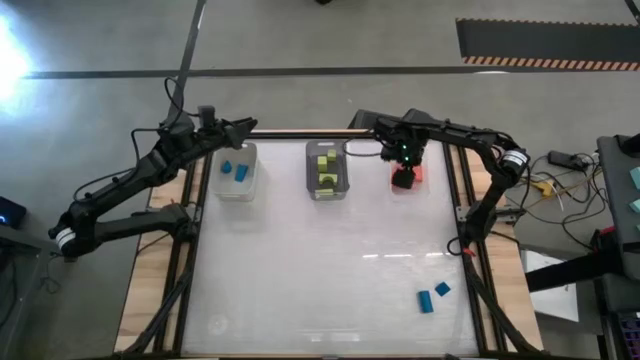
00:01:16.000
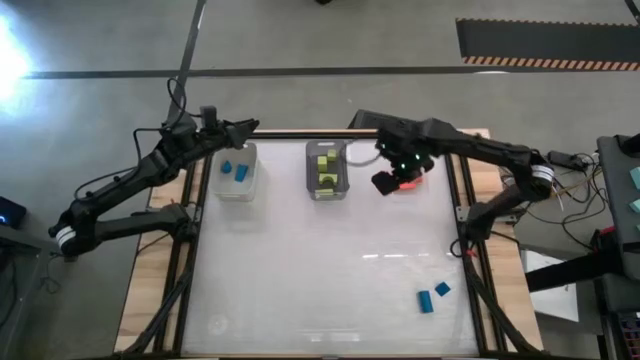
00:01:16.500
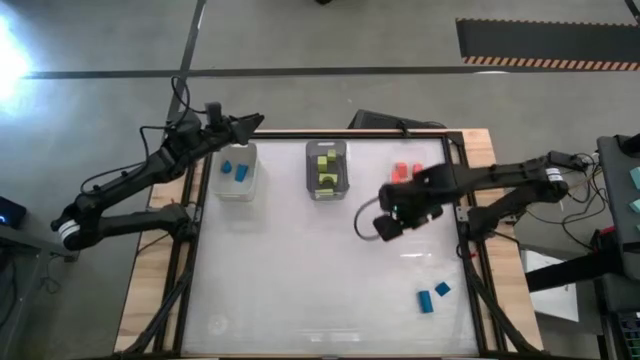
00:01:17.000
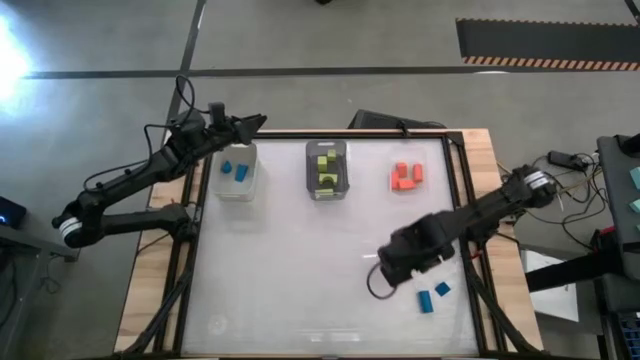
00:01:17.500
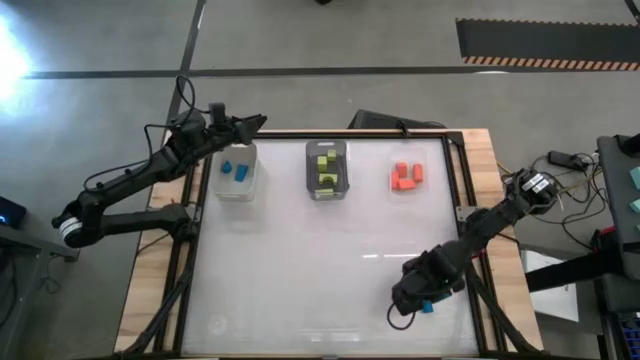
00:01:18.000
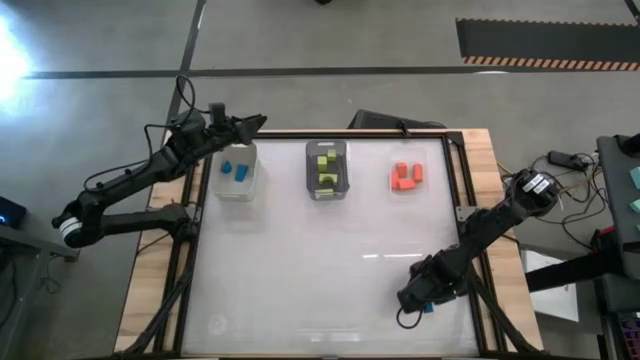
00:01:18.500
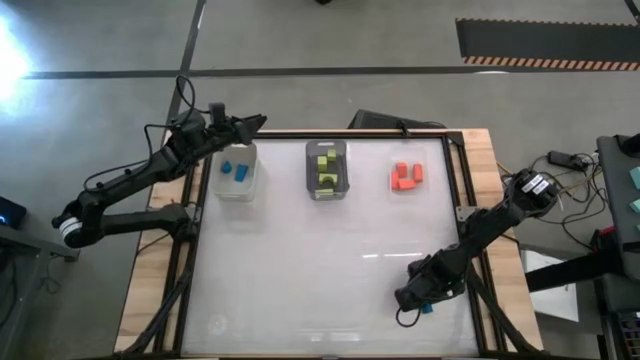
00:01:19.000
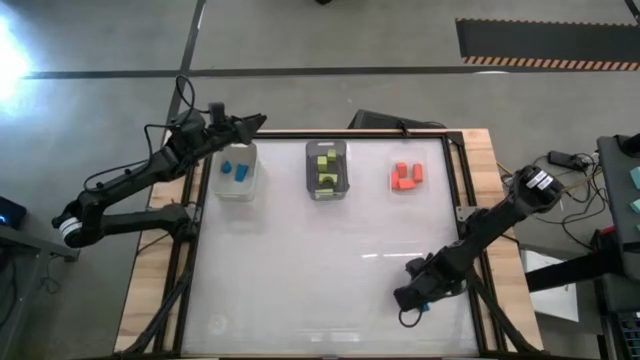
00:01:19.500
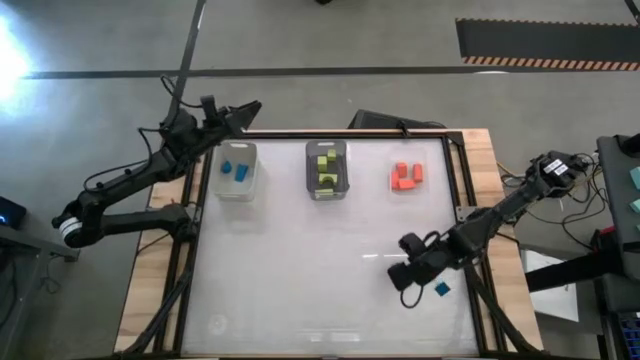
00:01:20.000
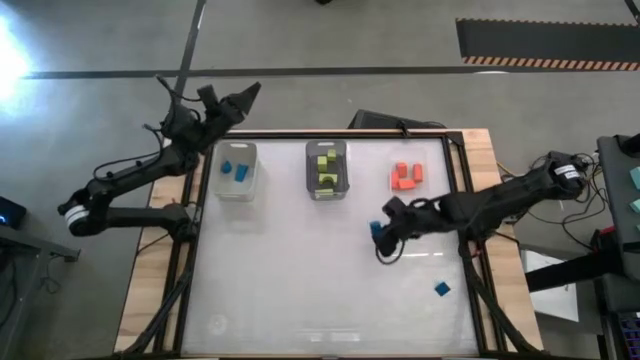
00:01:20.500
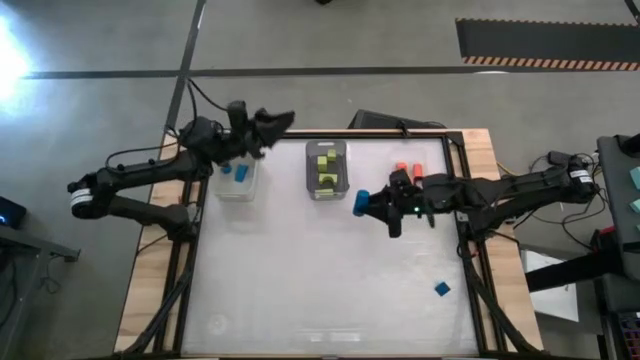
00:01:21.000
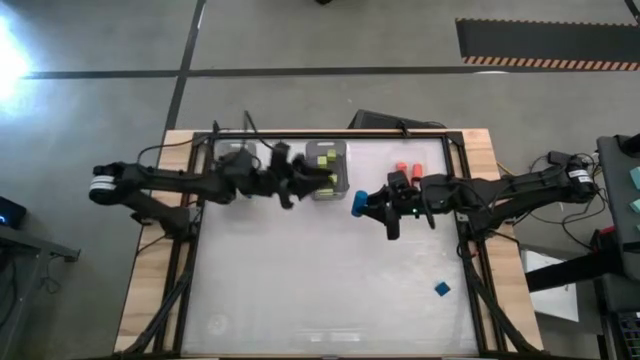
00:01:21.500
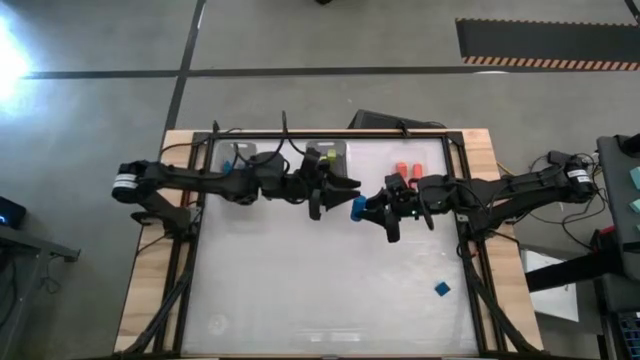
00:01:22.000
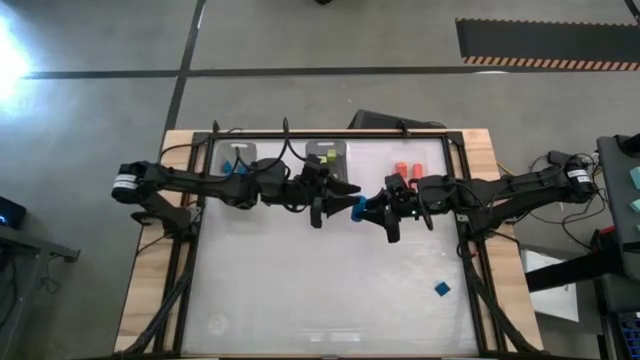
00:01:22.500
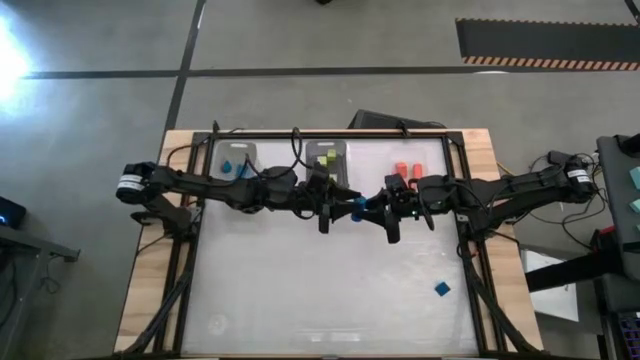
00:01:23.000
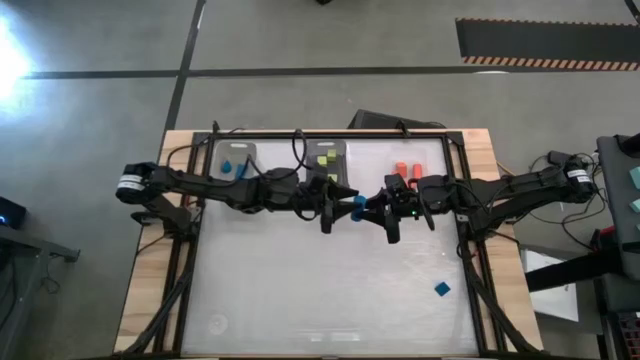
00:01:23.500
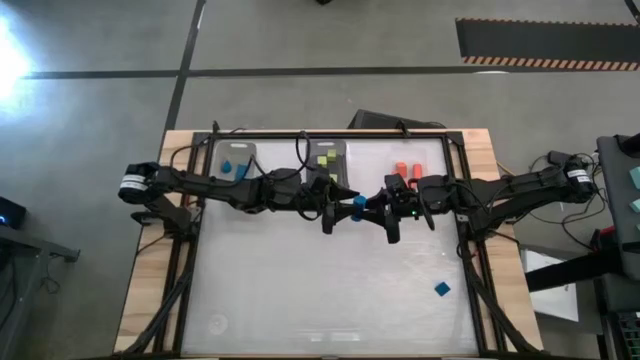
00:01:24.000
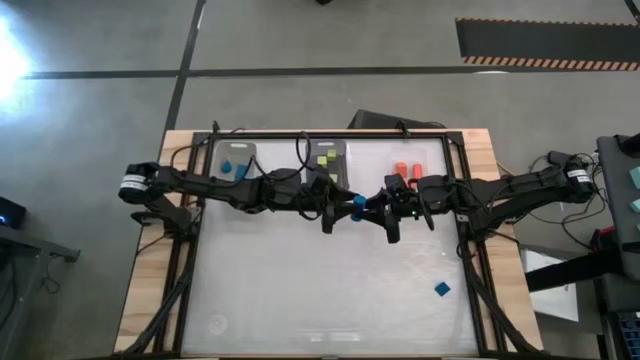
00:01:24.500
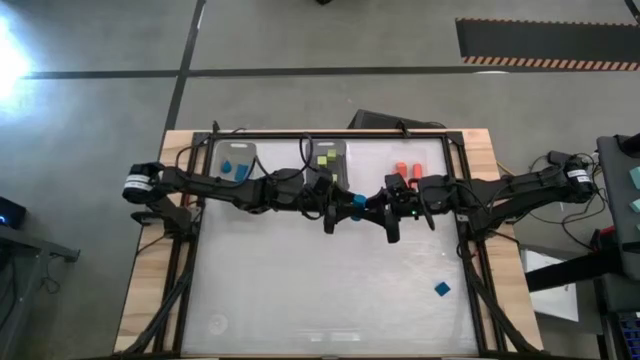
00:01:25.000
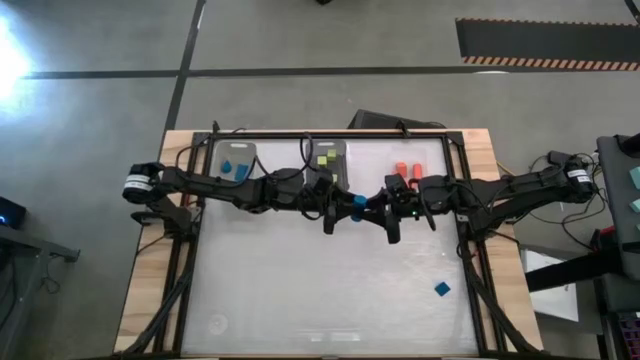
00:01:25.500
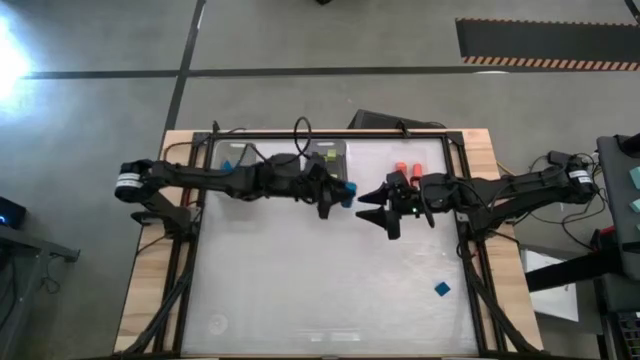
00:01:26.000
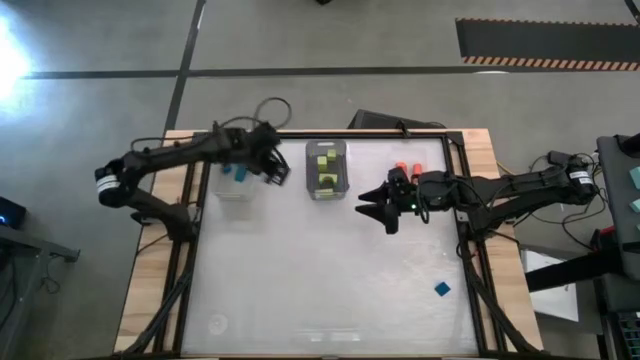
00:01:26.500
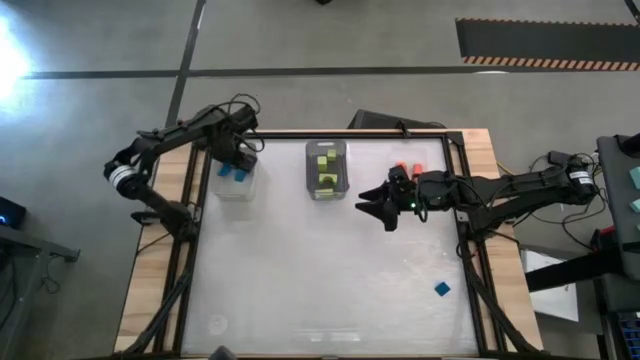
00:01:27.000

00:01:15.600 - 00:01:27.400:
Task: Sort & place blocks by color
Put the blue block into the white bin

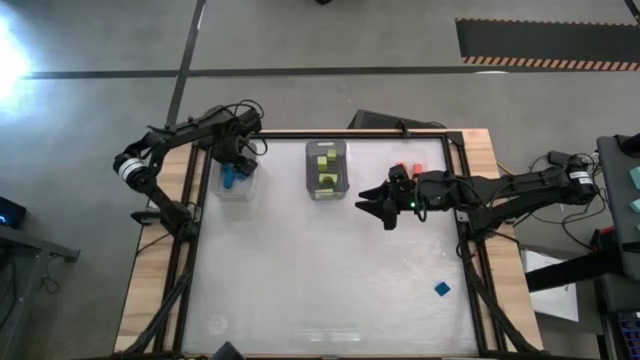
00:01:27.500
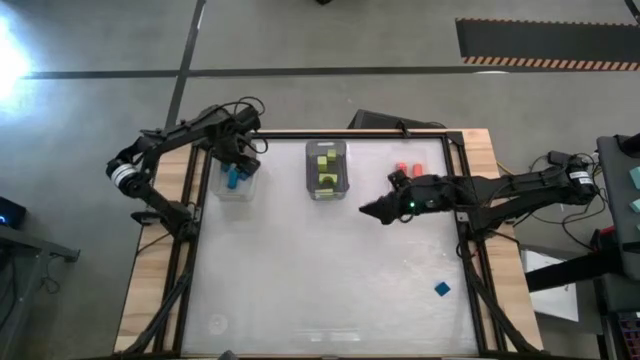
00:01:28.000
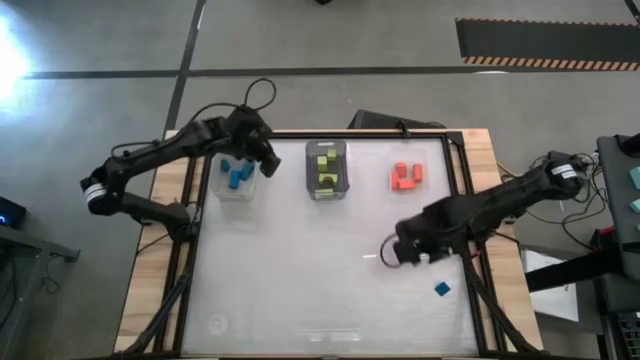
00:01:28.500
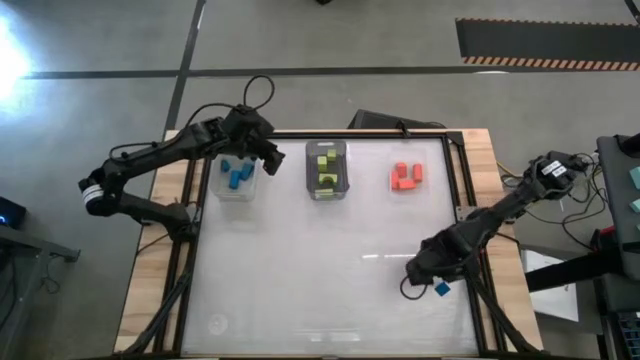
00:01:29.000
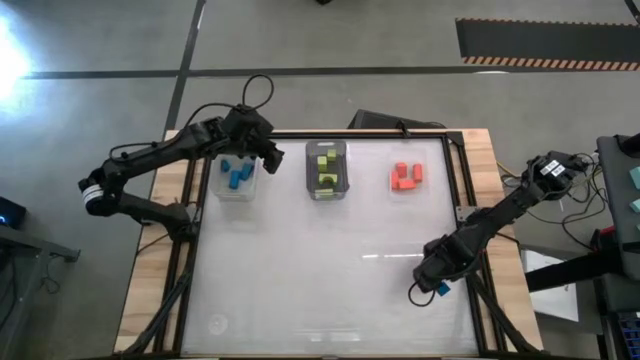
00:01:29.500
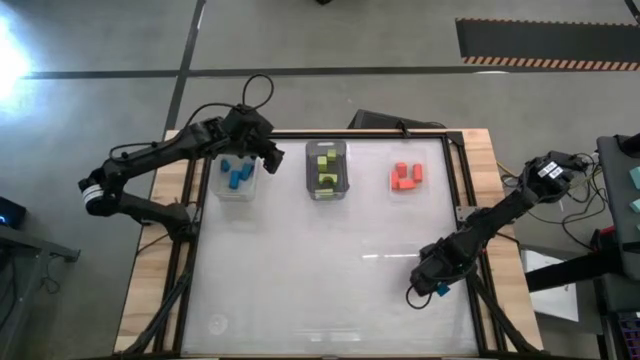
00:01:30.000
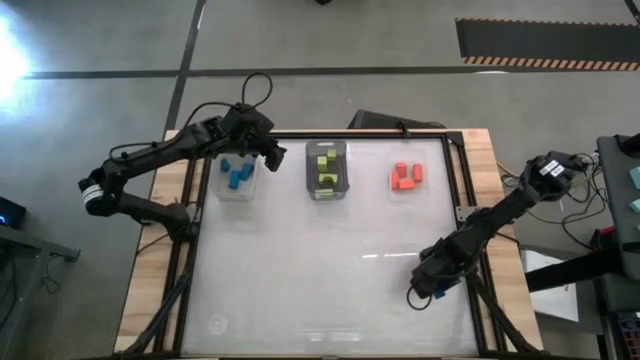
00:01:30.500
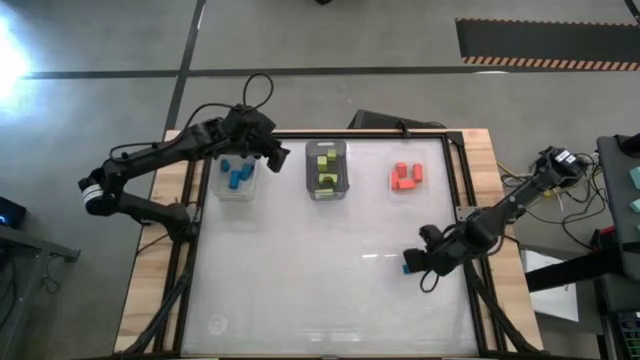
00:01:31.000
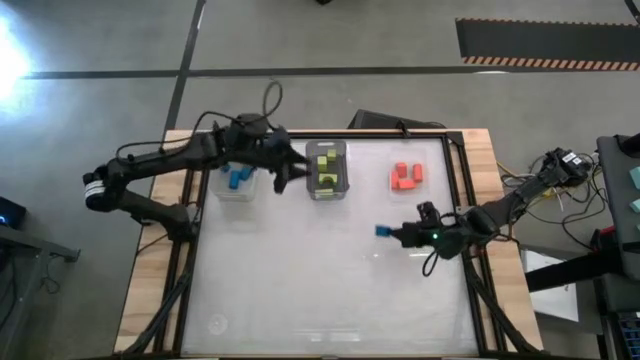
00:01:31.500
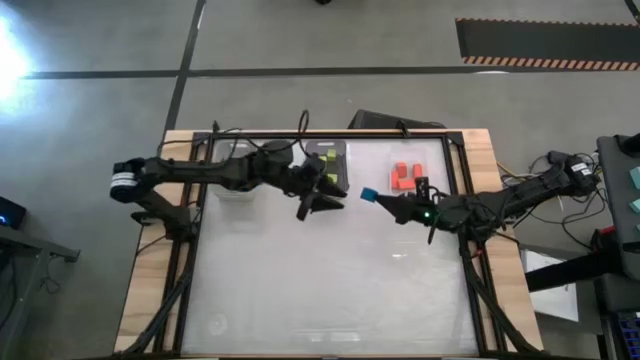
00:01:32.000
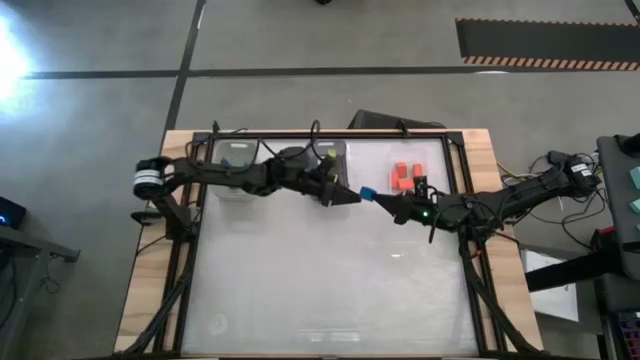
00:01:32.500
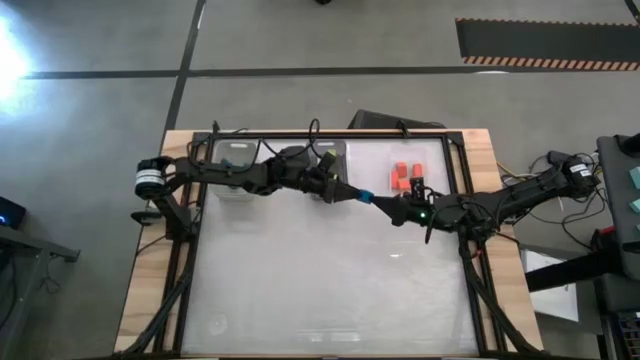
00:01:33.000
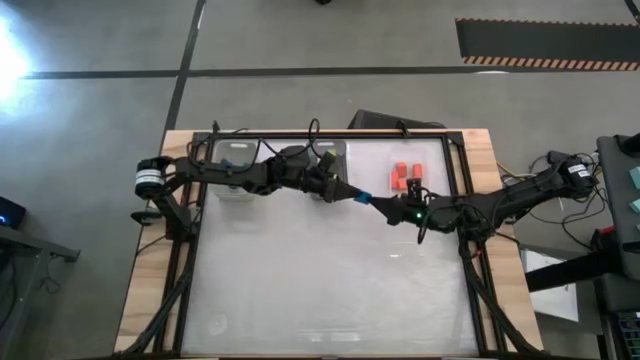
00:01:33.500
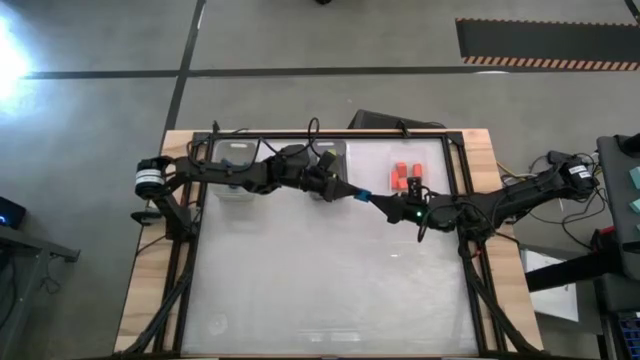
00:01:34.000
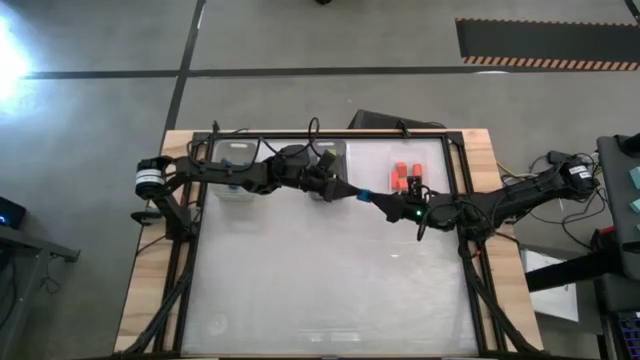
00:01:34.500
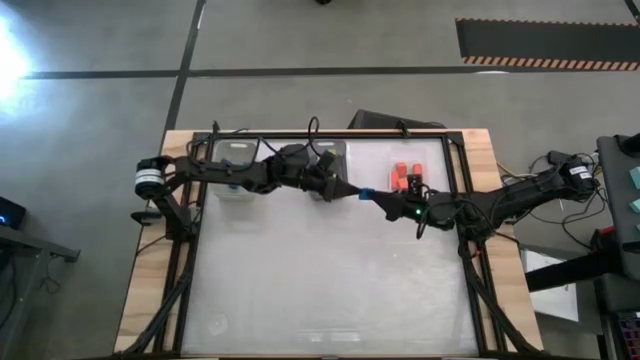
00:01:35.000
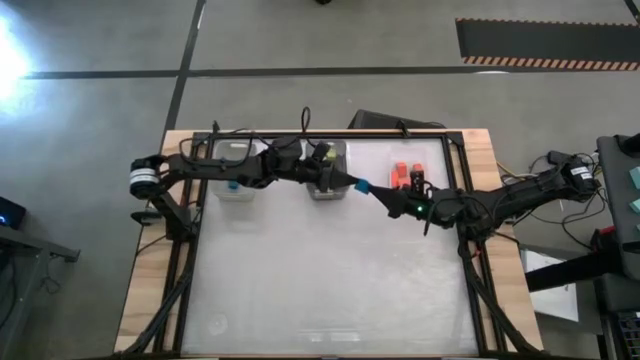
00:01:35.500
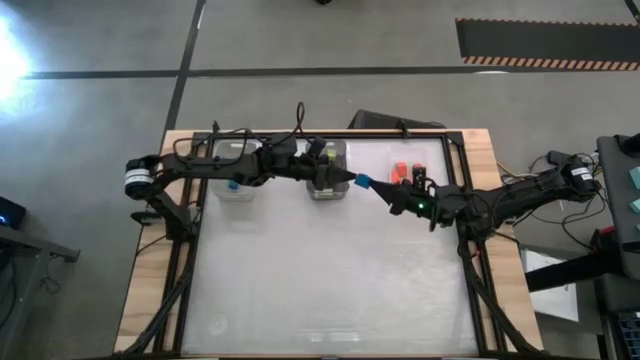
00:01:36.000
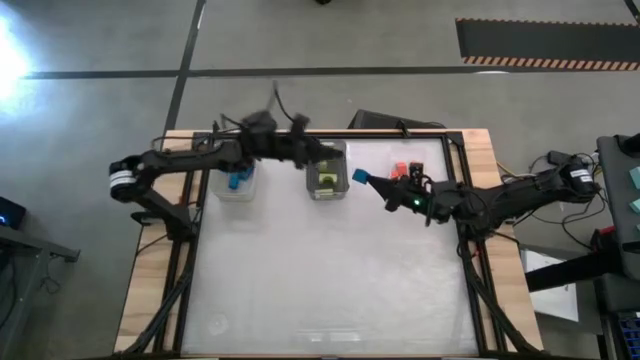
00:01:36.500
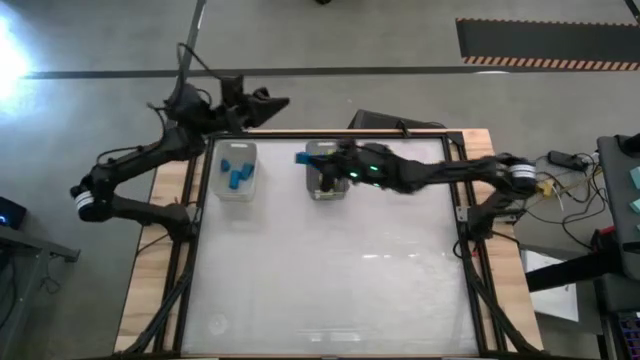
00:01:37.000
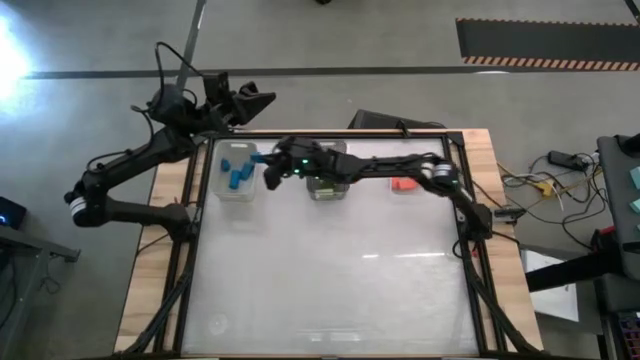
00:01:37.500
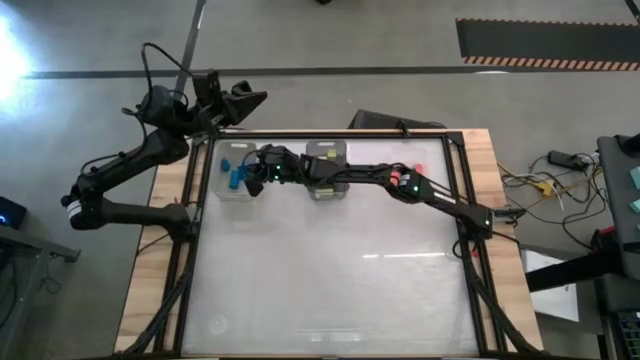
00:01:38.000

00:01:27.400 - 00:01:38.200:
Put the blue block into the white bin
